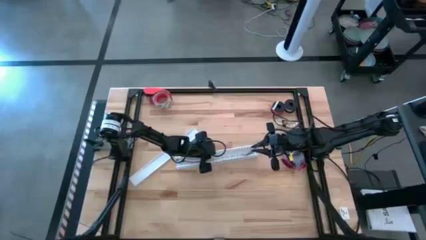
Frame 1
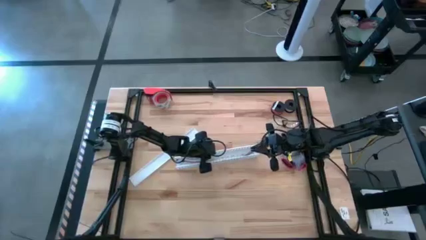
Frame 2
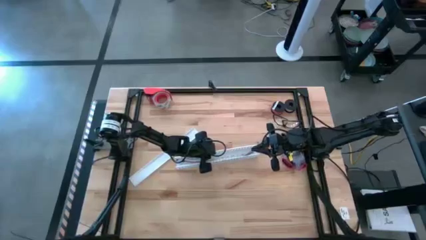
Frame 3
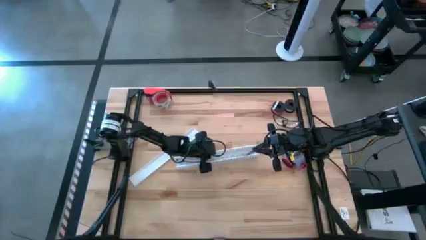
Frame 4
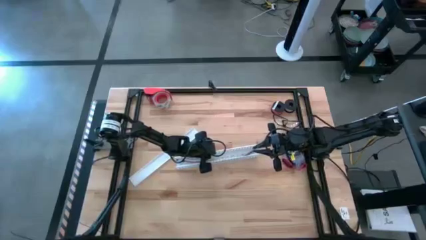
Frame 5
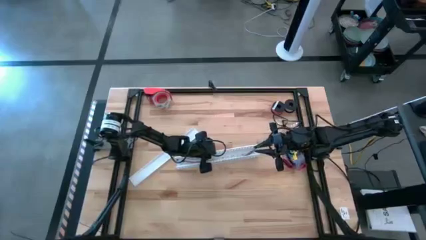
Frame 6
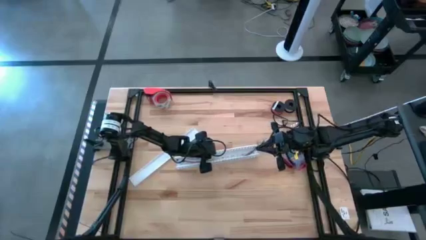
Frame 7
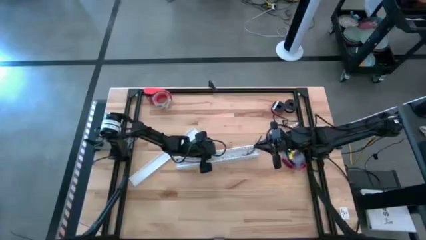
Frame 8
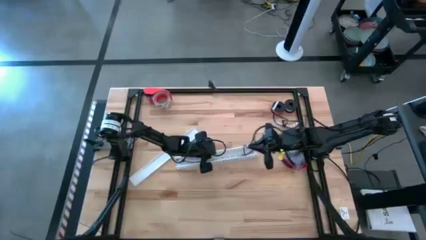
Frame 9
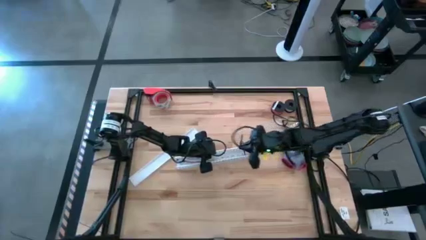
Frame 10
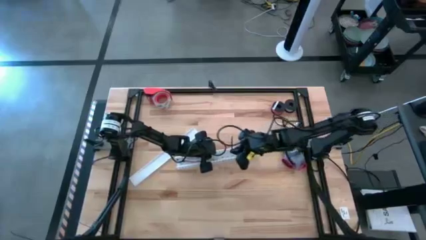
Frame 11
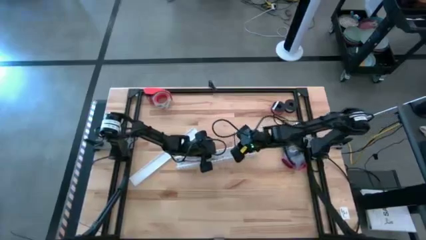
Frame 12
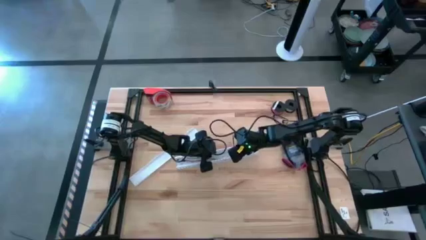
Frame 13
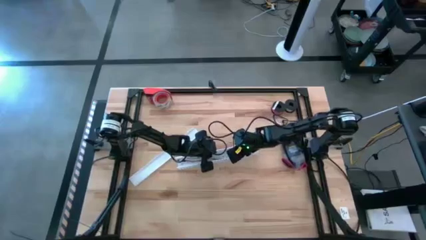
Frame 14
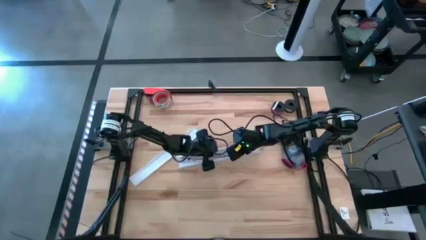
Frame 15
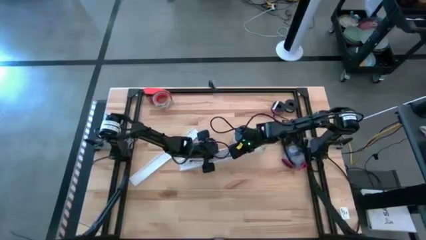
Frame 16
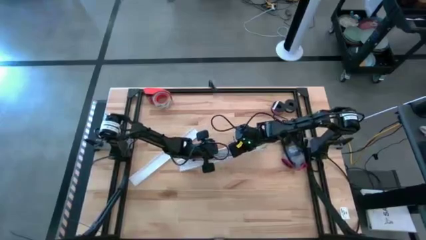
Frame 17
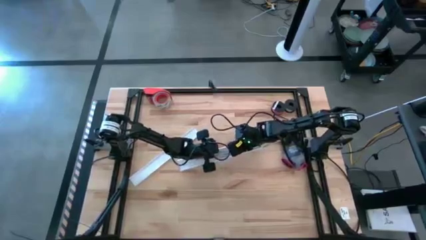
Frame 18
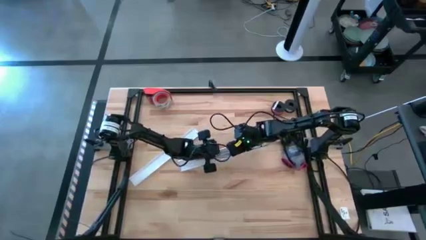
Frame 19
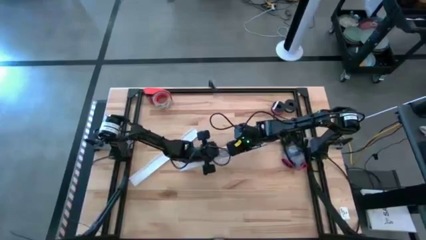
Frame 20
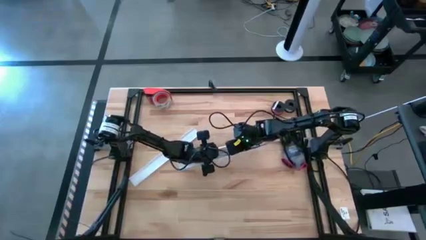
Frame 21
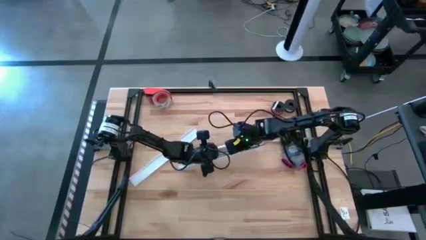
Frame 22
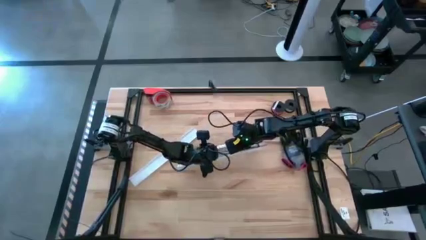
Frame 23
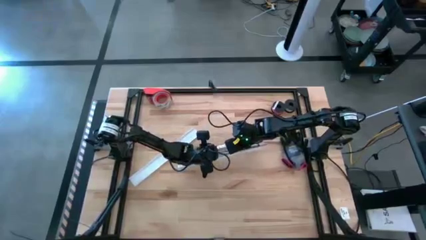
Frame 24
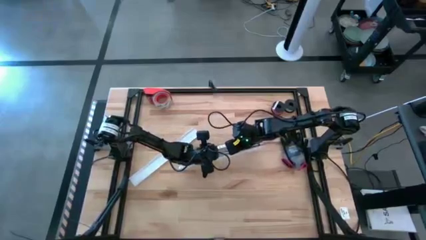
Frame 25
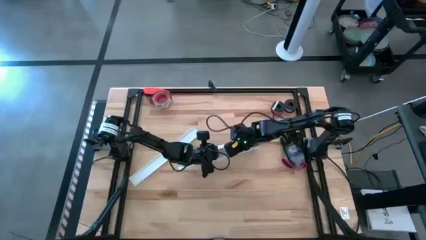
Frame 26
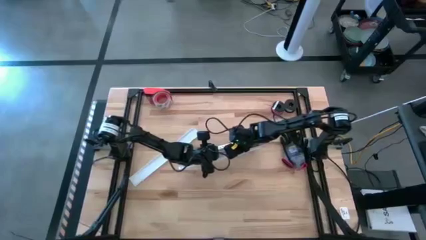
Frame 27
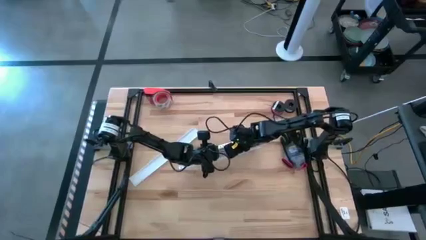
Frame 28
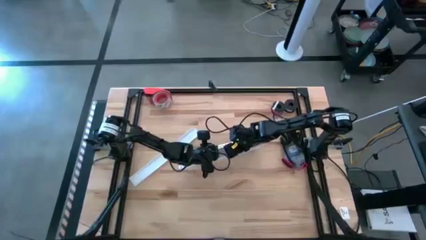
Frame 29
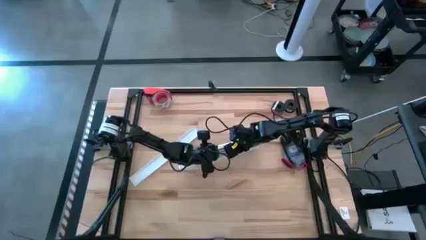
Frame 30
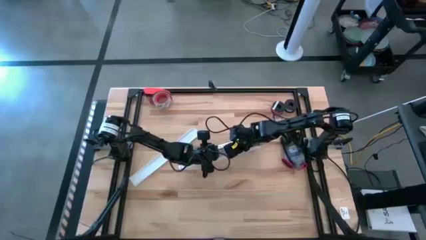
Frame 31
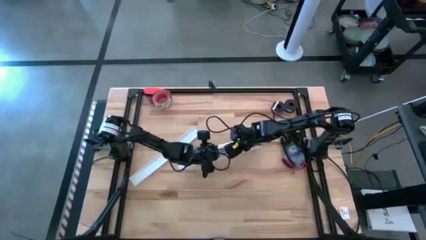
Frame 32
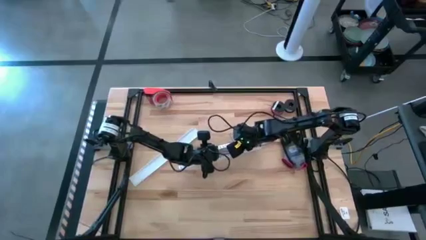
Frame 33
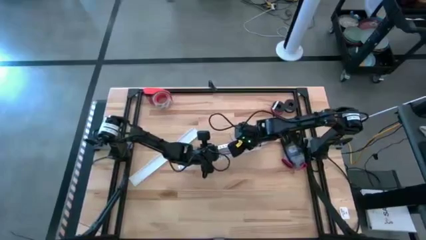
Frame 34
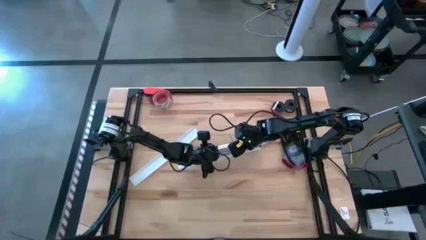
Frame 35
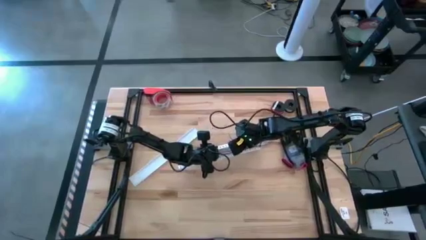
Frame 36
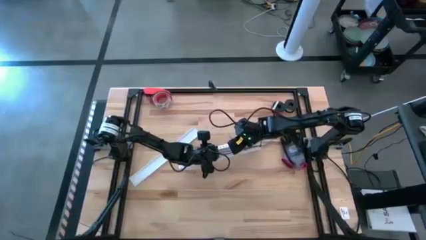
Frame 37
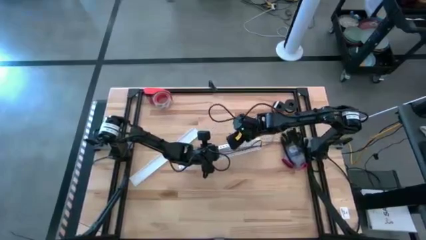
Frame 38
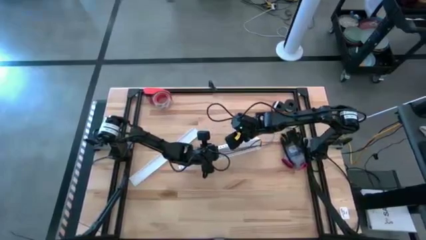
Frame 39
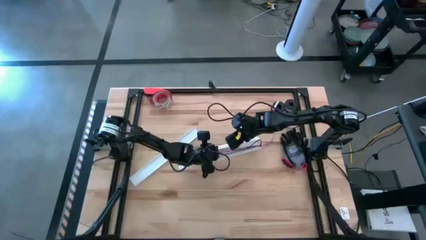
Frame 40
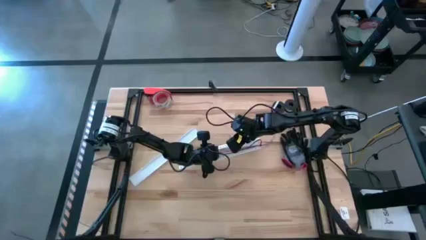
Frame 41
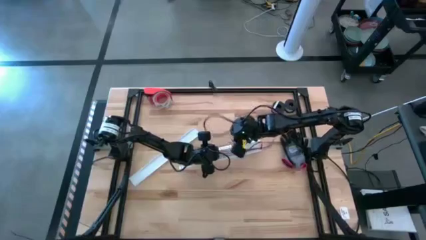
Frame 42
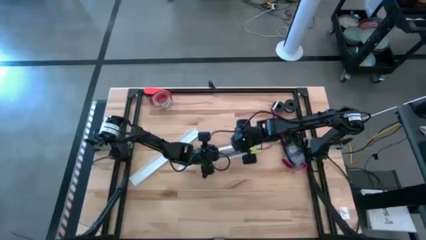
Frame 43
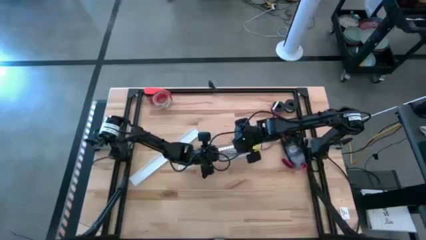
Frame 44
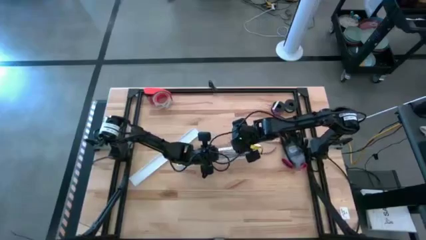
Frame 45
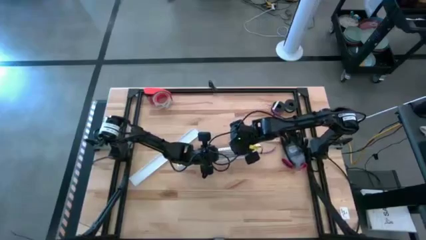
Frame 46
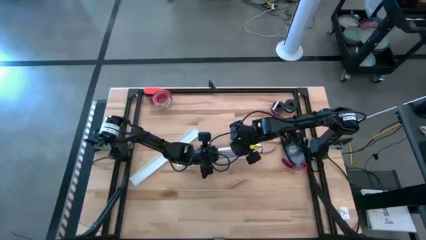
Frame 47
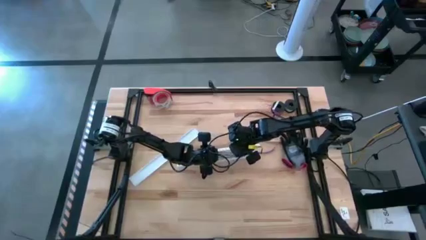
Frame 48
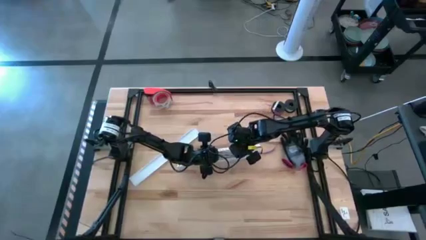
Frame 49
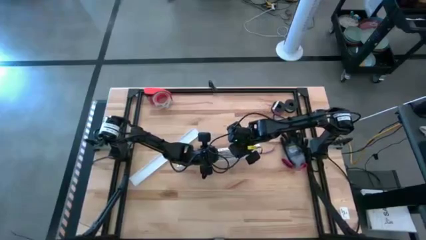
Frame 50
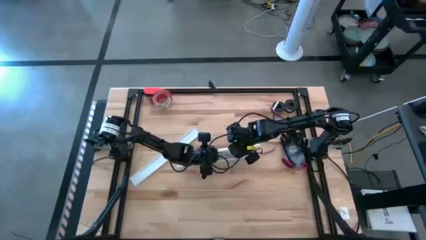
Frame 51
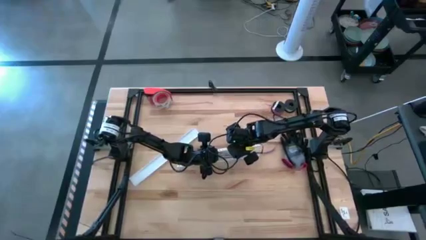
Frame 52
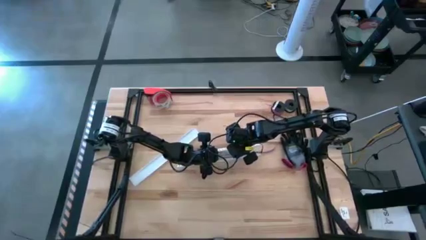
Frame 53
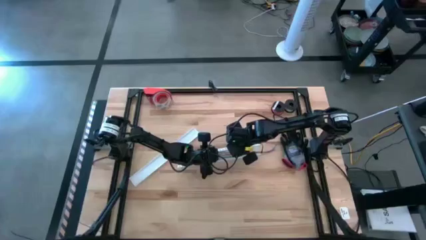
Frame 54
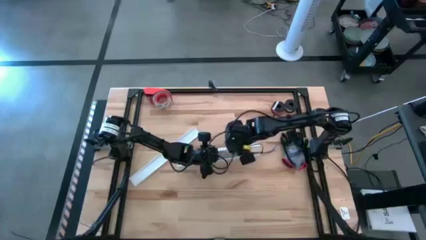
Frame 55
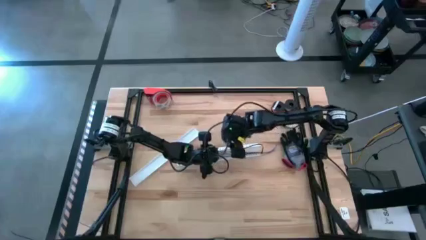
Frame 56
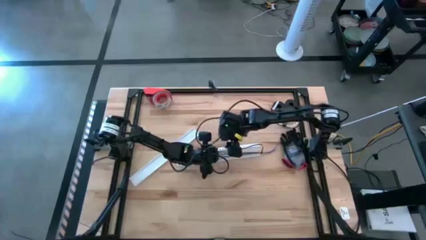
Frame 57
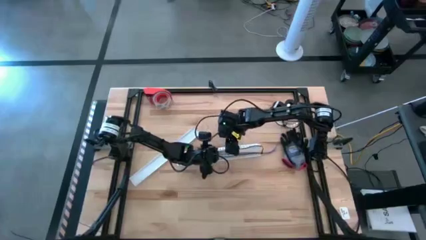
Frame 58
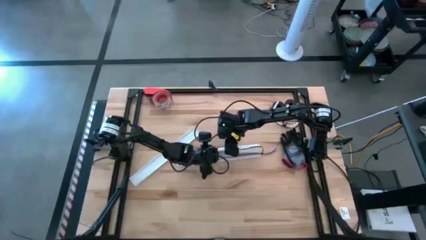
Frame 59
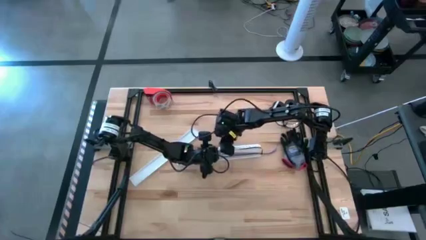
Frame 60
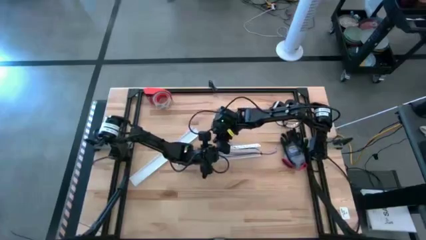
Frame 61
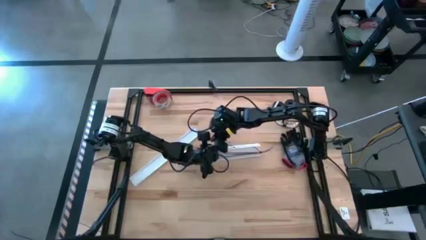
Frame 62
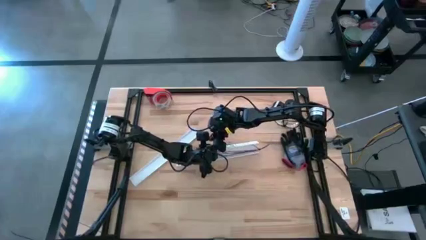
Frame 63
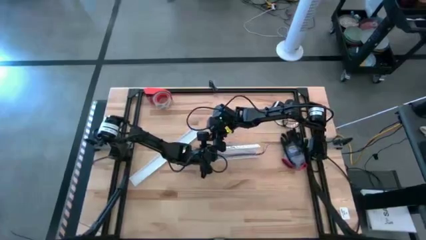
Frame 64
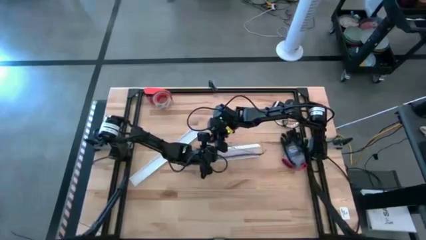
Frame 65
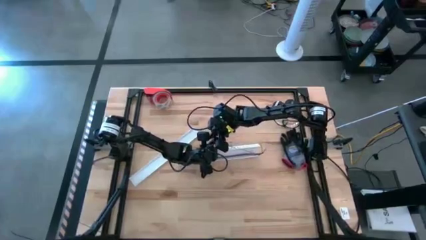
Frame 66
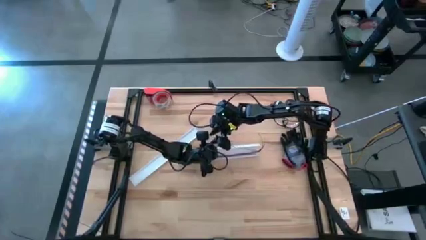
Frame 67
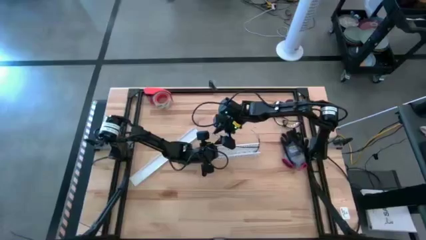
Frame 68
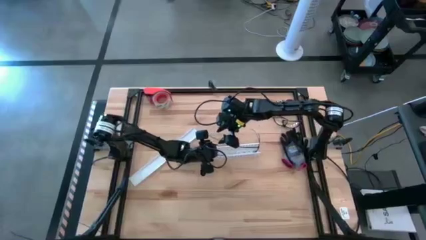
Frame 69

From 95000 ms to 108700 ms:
Task: Ziptie cables
Put the zip-tied cables into the white cable duct

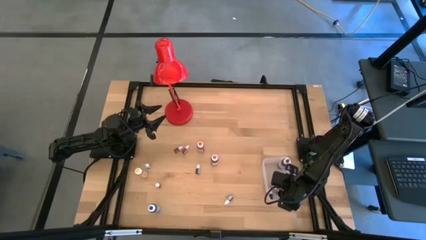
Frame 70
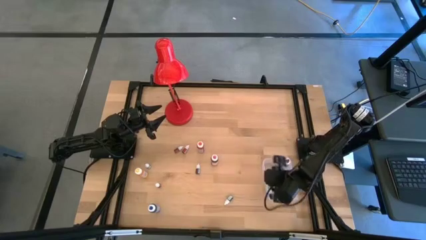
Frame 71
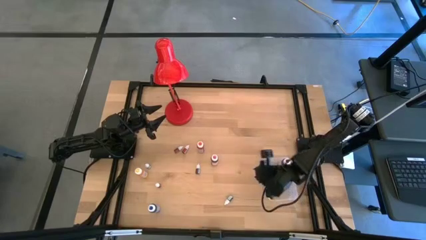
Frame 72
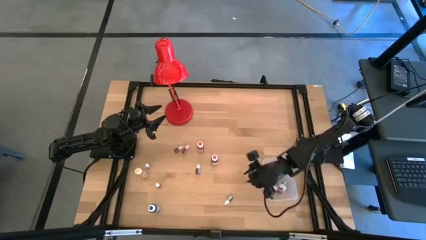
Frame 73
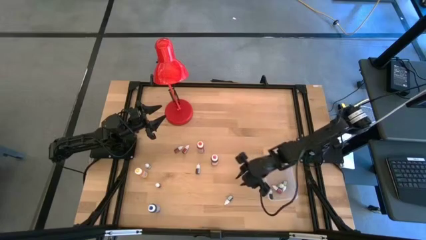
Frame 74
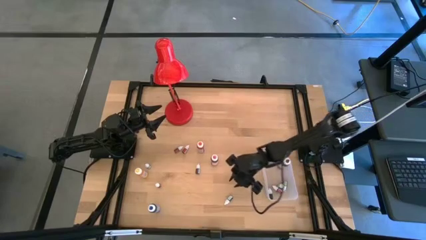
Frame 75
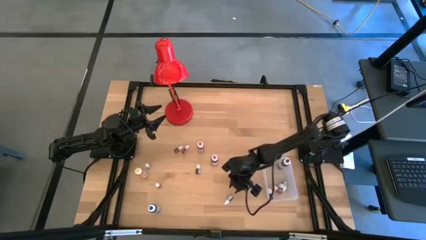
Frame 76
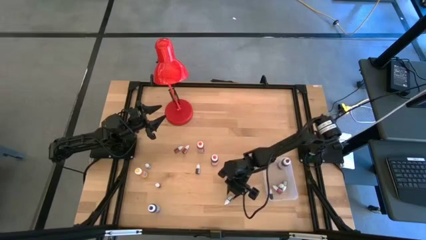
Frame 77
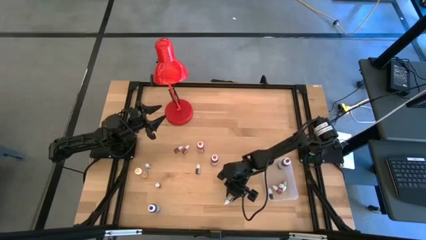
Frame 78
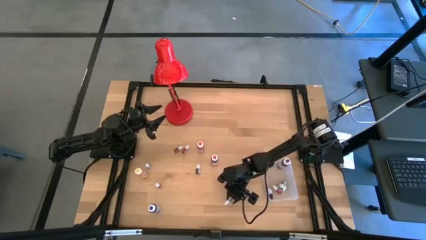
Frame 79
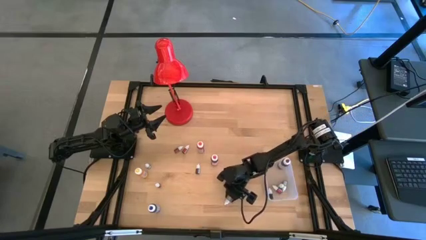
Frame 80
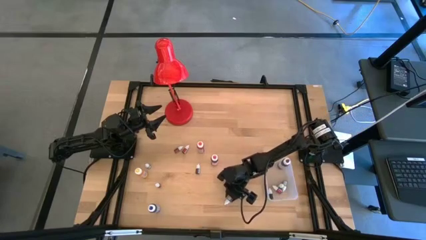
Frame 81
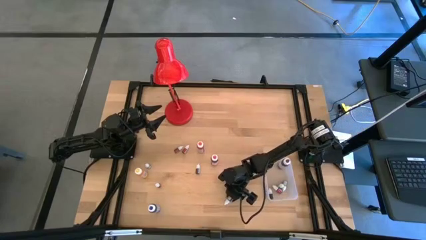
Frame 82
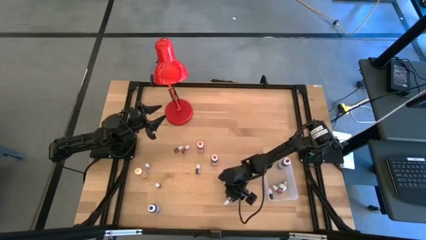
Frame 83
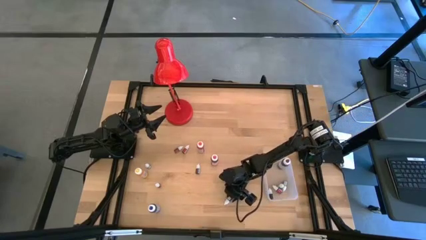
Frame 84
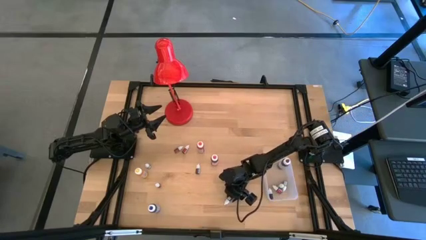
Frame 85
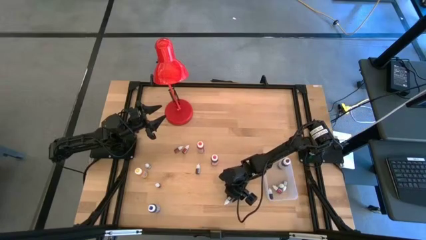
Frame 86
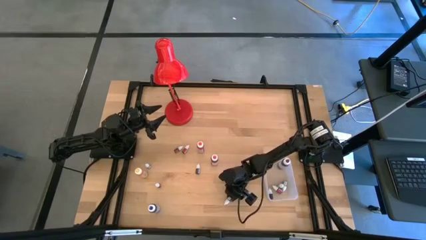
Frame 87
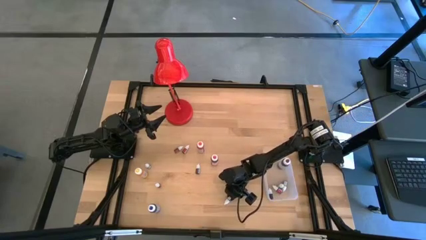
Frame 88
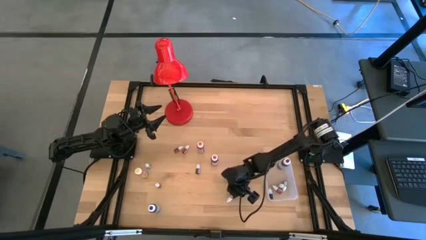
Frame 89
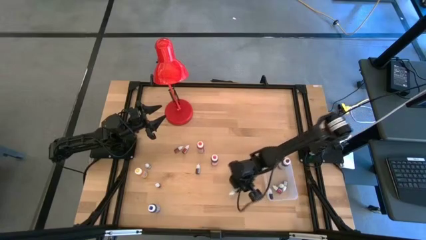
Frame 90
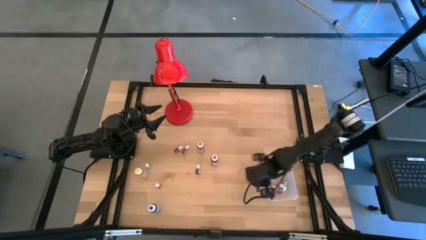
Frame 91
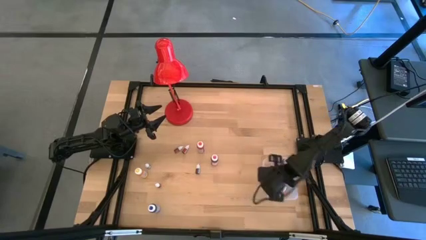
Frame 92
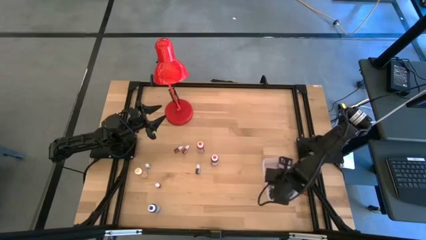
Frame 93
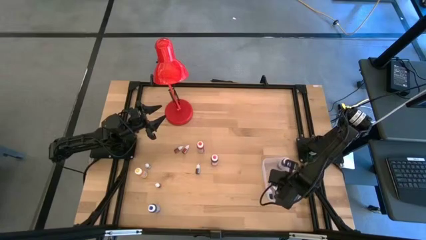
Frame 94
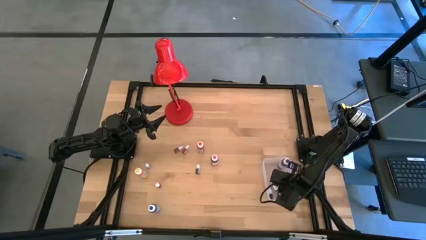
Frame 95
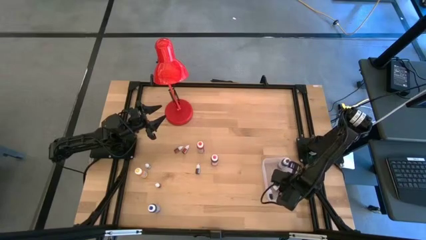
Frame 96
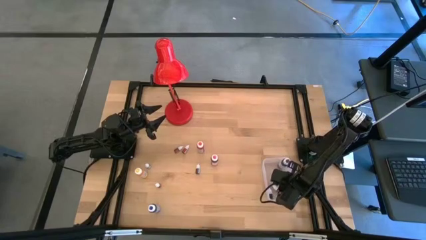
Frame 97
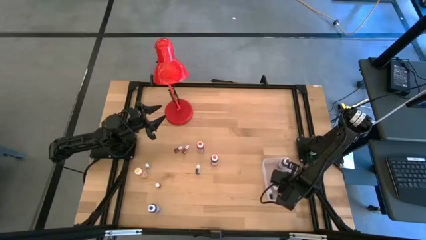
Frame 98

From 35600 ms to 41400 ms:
Task: Pick & Place food coloring
Put the small green bottle into the transparent container
